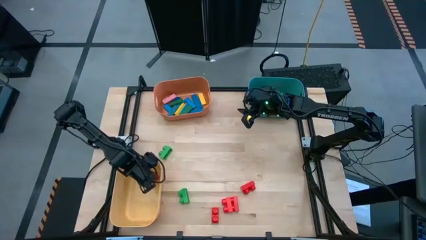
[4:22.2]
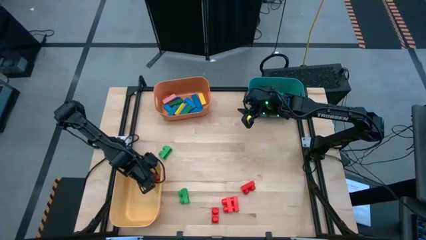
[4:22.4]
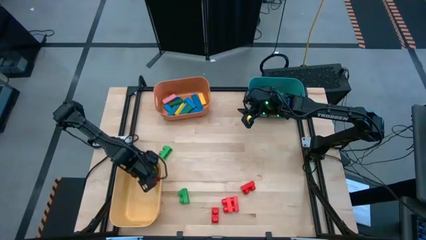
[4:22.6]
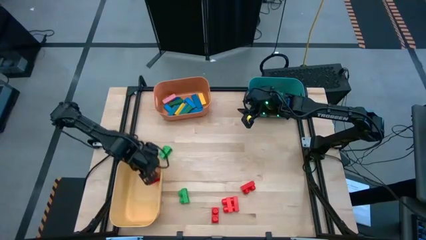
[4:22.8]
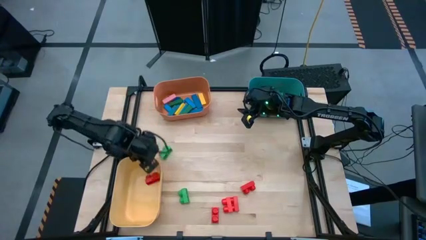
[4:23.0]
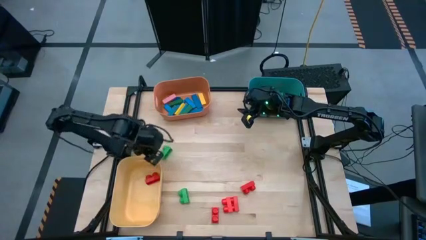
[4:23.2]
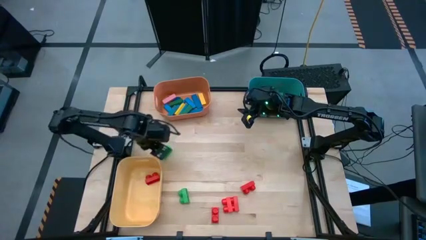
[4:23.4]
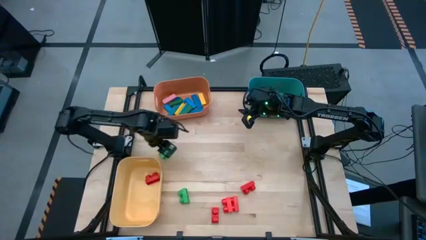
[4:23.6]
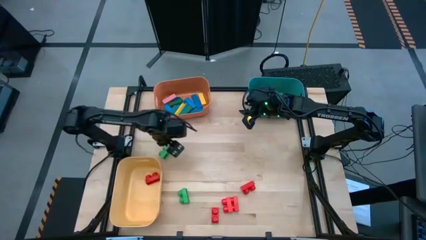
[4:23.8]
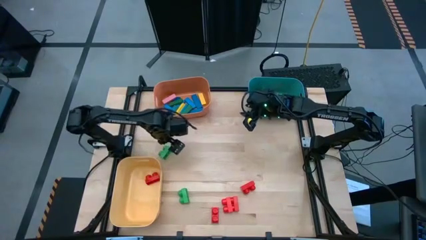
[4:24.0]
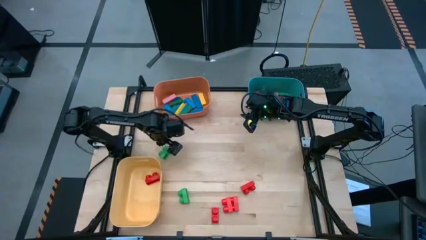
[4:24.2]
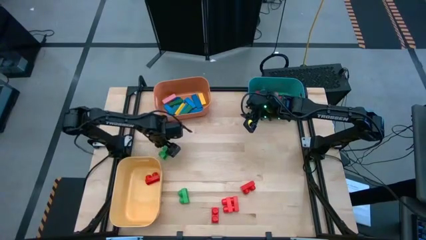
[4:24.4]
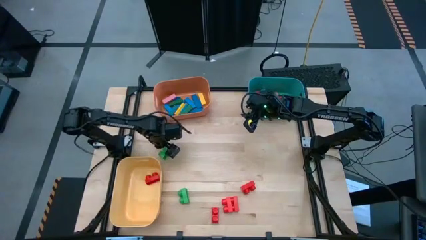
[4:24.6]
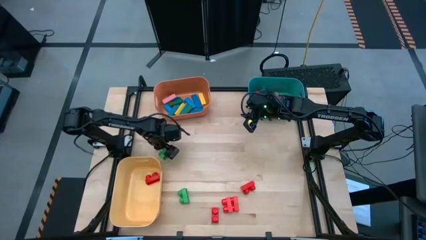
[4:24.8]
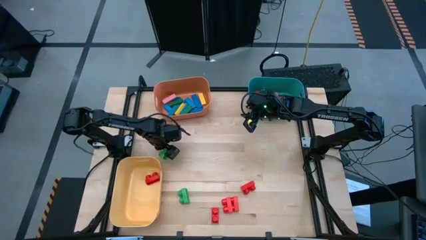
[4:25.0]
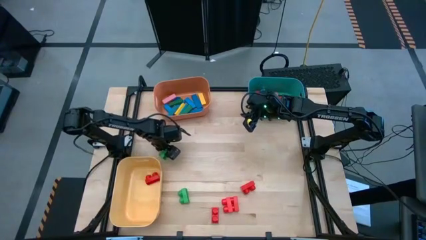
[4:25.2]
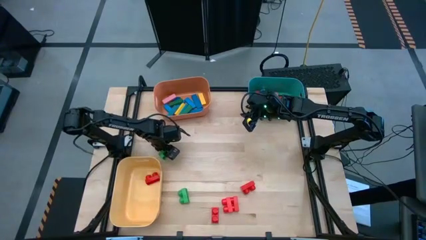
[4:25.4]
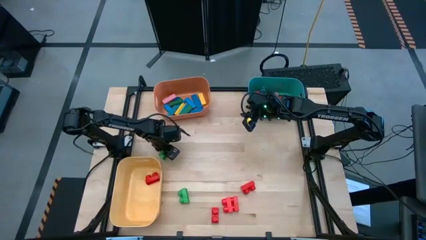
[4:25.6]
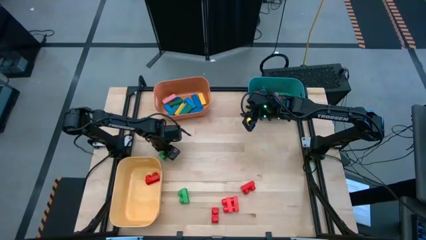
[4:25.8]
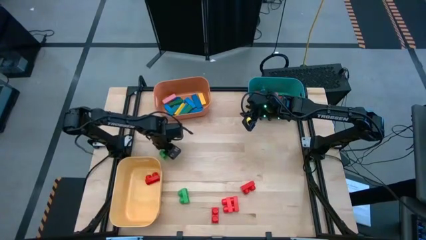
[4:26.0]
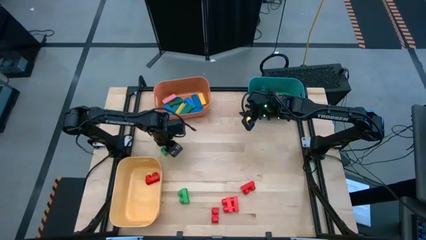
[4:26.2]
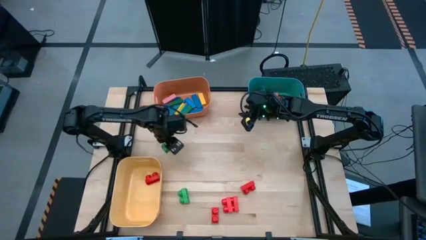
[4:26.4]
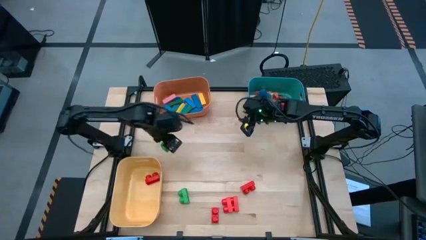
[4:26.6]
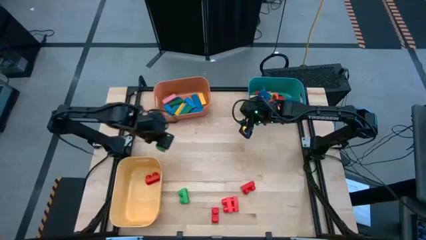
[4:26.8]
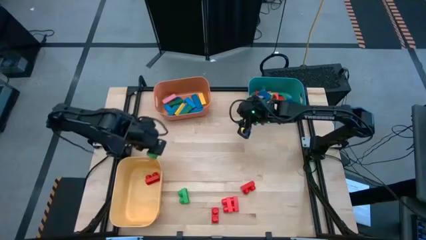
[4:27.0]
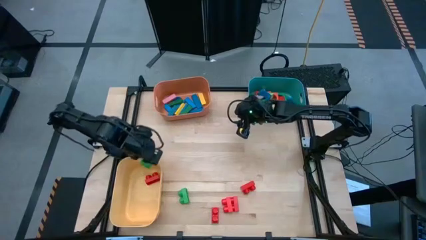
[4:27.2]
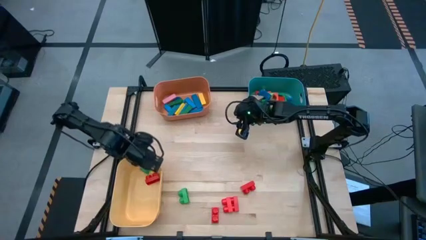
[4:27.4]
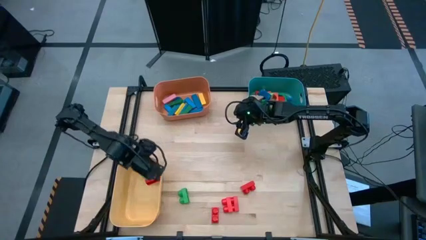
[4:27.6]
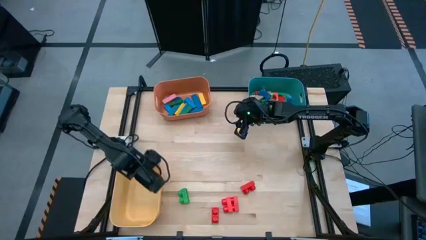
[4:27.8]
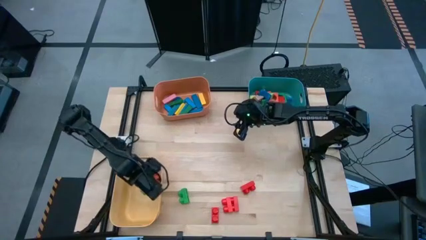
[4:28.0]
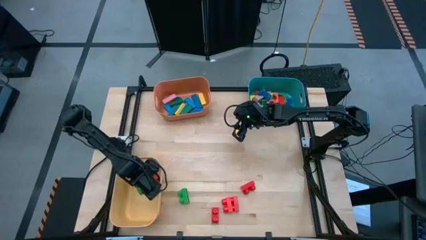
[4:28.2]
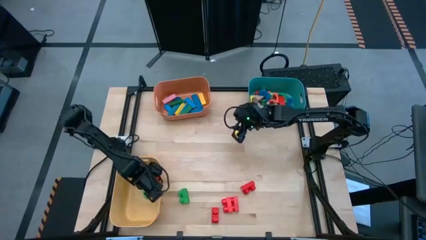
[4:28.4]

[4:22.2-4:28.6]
Task: Sort blocks by size
Put the green game piece into the yellow bin

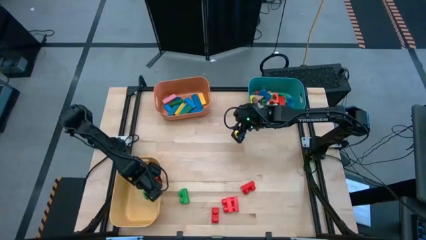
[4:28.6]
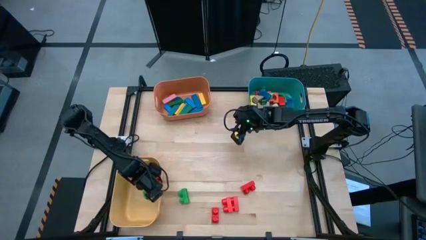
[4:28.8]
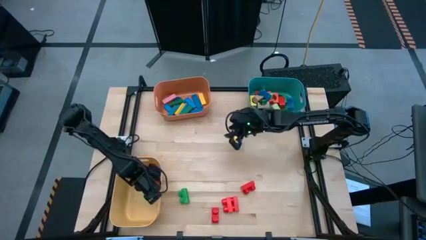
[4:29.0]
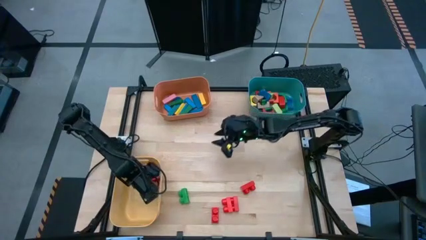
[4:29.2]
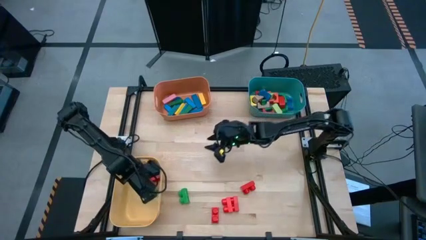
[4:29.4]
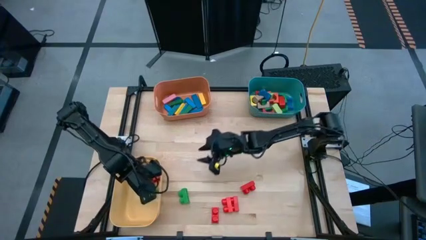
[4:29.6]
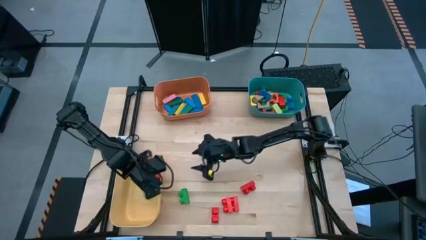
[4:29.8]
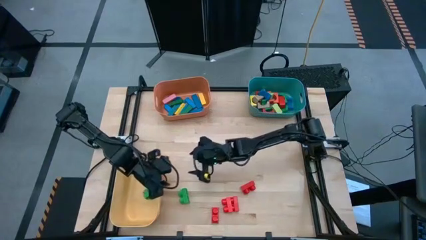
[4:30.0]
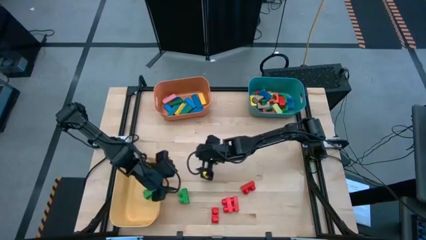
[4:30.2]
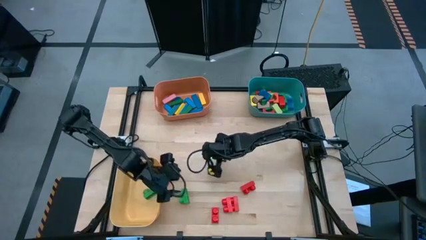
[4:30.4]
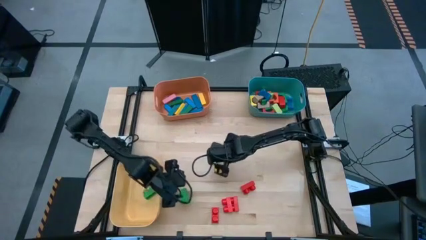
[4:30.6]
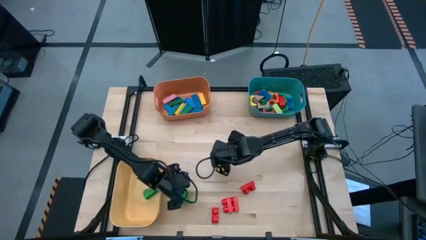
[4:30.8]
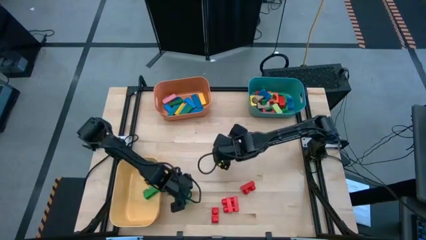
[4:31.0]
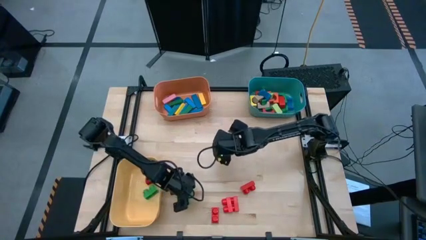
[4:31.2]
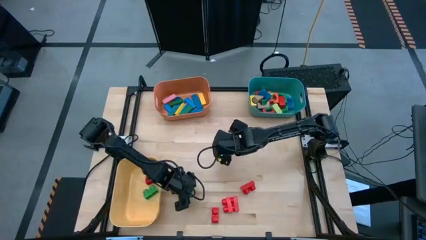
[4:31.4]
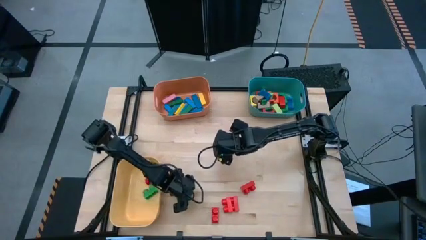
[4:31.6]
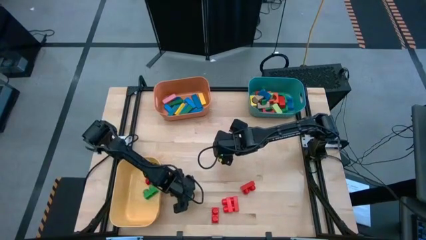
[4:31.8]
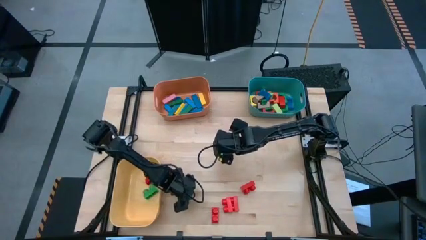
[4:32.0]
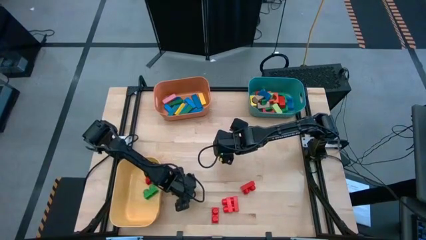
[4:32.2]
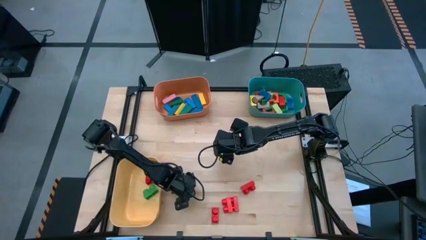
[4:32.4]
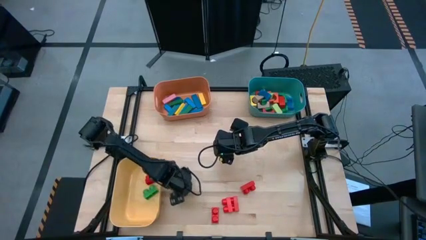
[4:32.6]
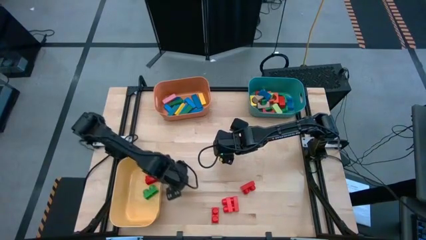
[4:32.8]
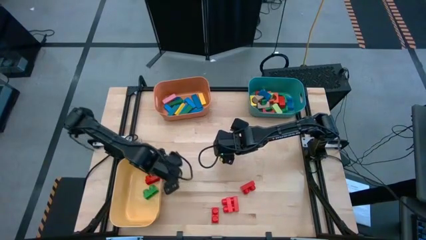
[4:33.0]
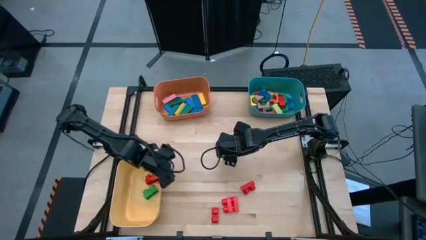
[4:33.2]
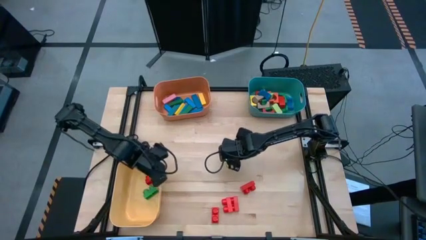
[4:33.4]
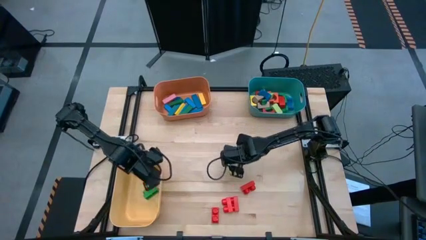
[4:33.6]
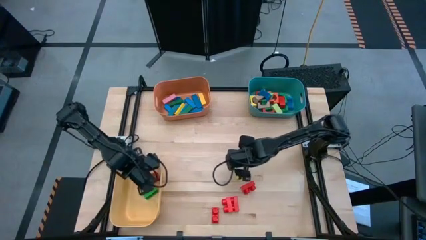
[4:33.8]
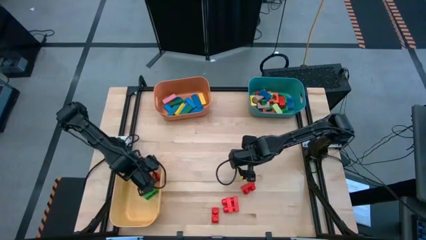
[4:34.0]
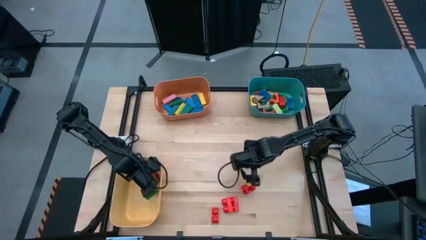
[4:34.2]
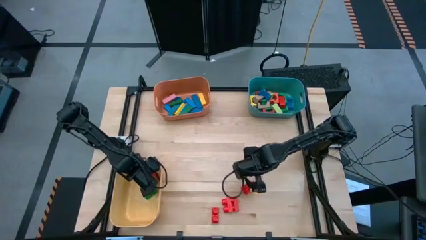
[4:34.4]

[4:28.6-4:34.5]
Put the green game piece into the yellow bin

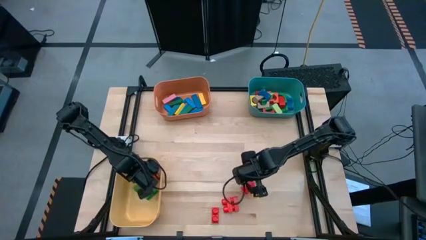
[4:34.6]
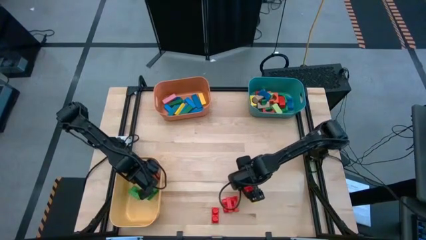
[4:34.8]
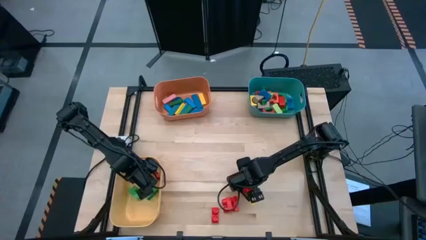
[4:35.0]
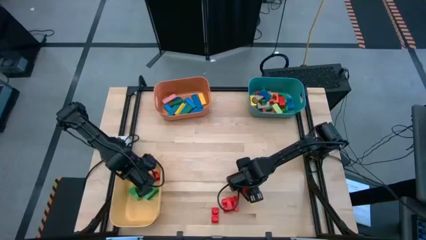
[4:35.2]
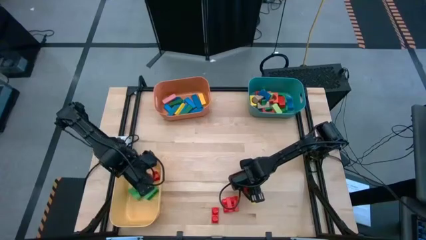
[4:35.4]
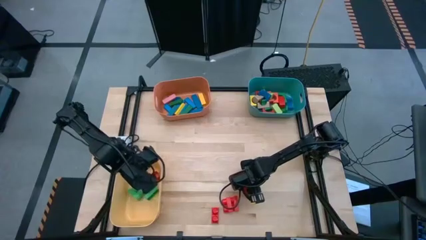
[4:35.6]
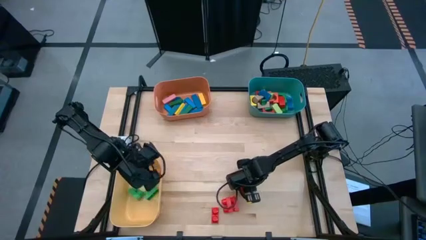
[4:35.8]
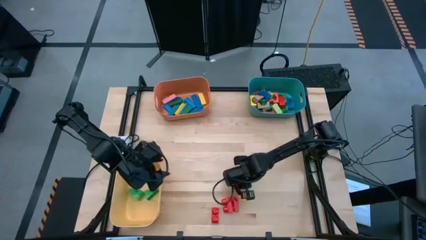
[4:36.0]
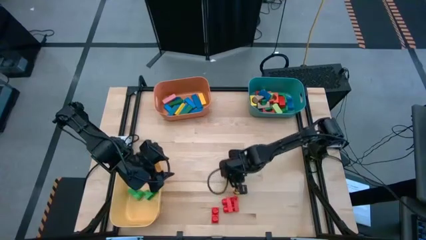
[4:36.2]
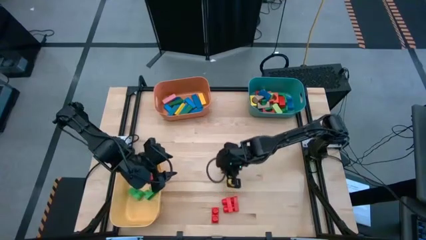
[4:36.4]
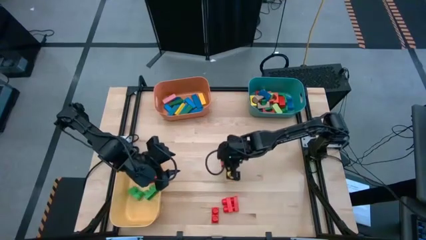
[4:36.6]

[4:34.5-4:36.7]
Put the red game piece into the yellow bin

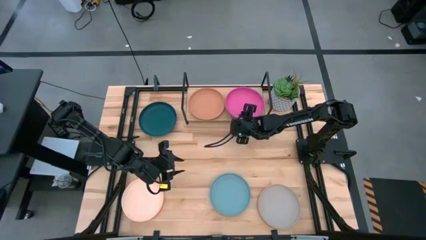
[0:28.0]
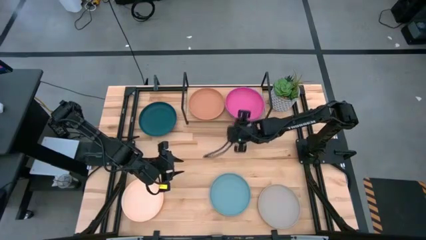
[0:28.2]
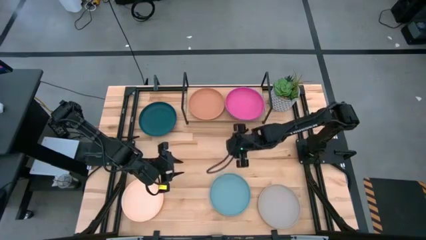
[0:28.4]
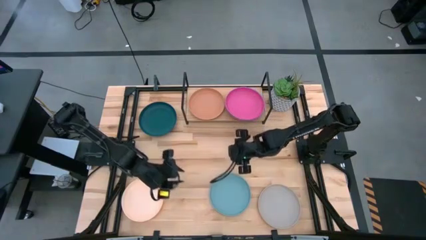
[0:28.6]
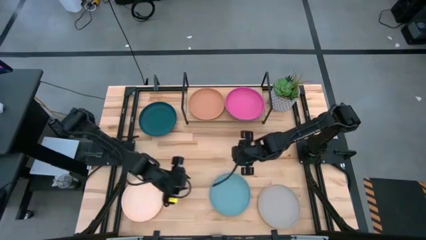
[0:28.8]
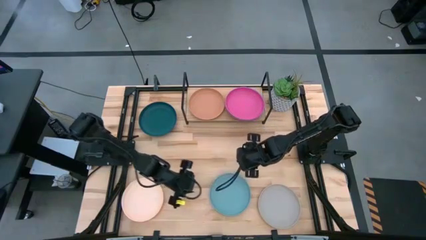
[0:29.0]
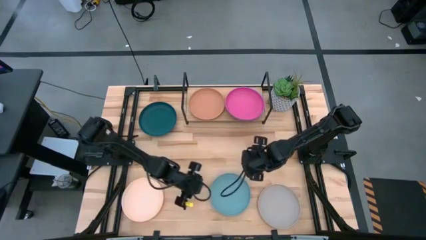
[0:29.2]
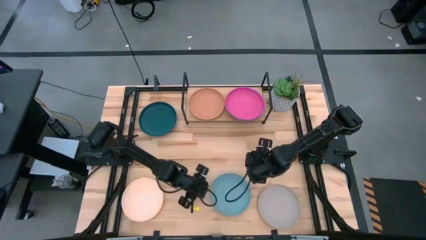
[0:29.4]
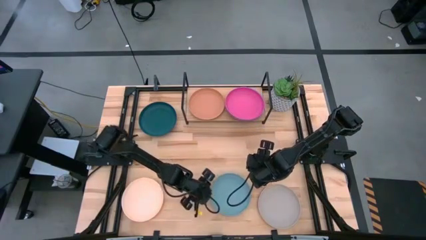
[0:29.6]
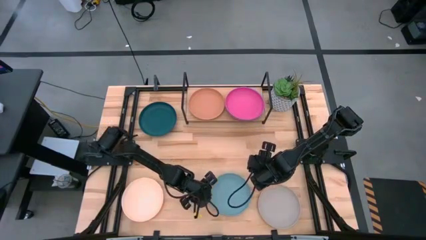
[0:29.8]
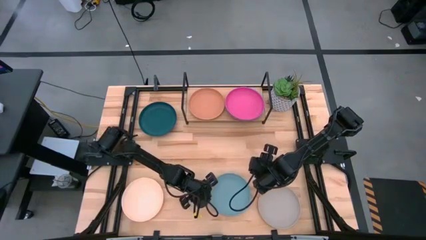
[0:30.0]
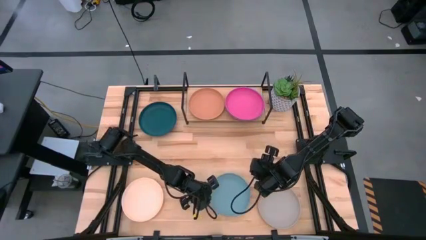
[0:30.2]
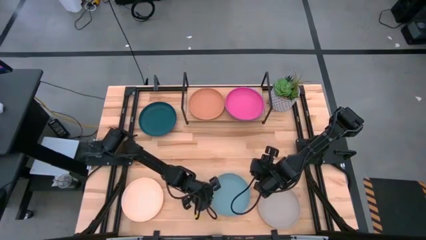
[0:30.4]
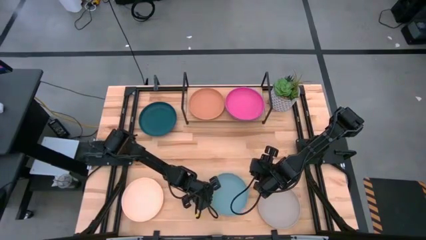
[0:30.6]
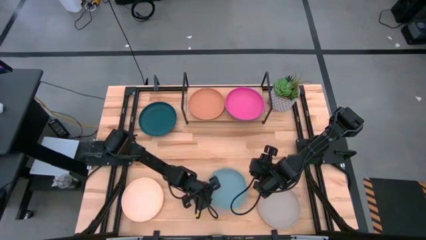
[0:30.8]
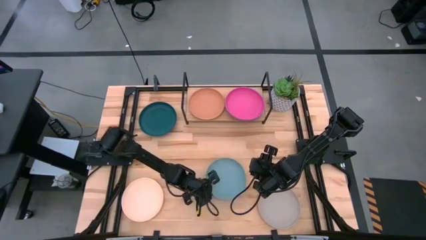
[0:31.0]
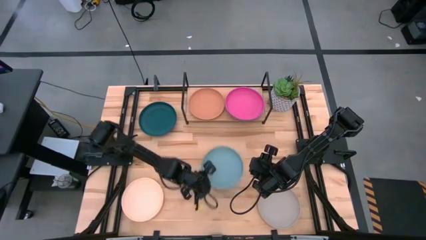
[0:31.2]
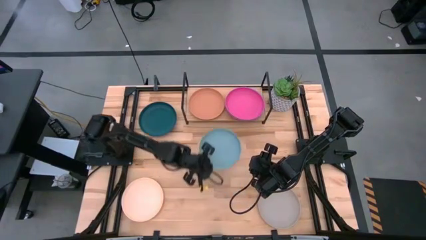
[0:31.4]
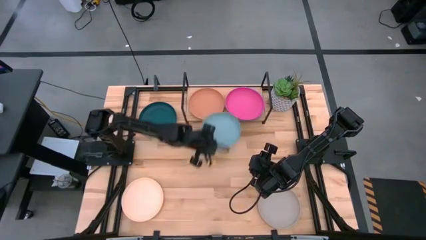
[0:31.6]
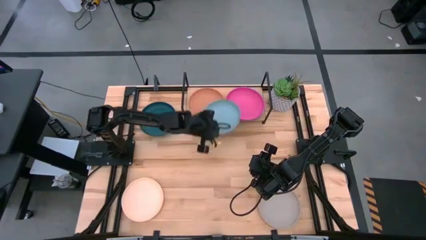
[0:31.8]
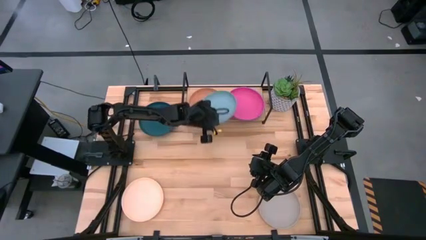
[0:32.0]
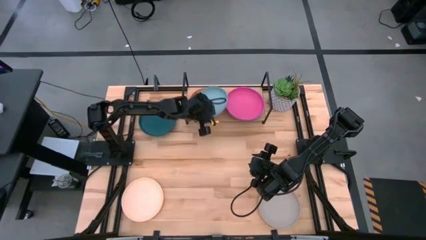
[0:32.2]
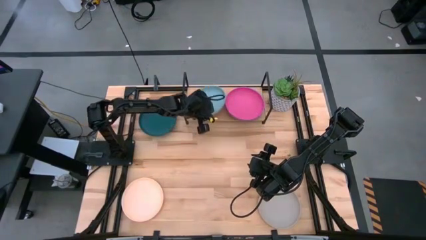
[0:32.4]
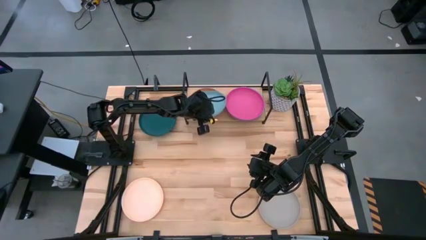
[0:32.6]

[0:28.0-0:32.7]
Task: Place and stack plates onto a shelf
Stack the light blue plate on top of the light orange plate on the shelf
